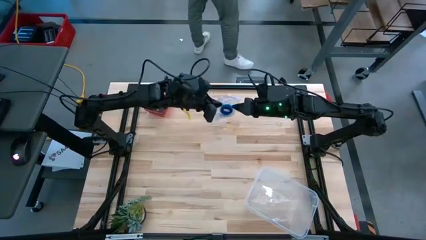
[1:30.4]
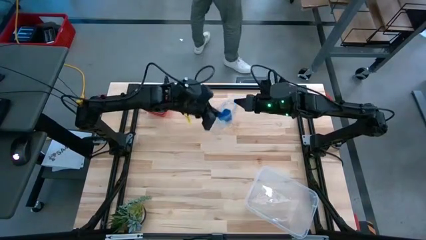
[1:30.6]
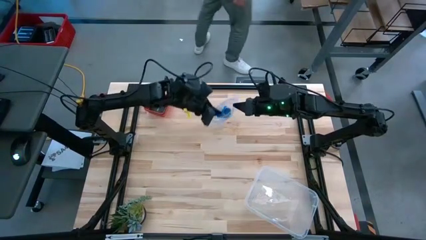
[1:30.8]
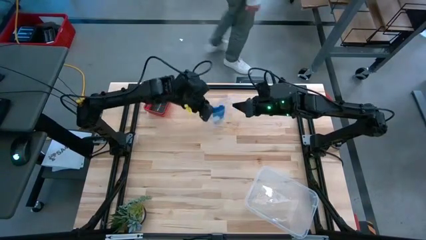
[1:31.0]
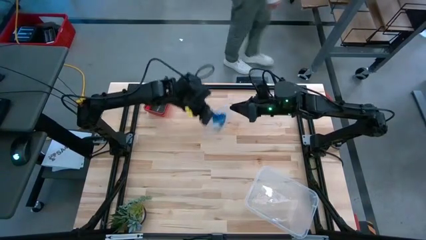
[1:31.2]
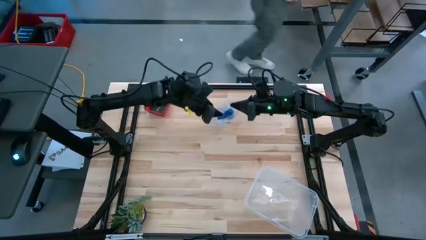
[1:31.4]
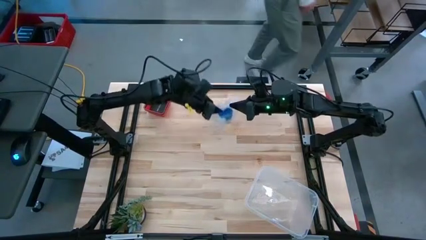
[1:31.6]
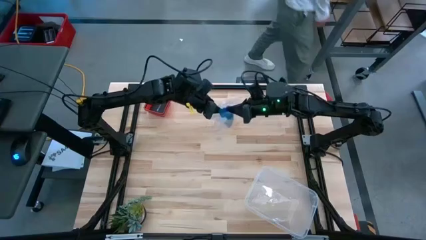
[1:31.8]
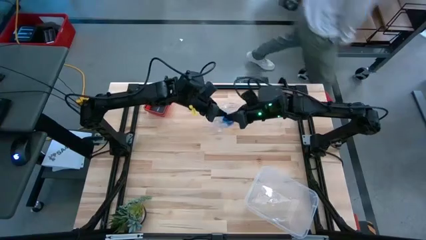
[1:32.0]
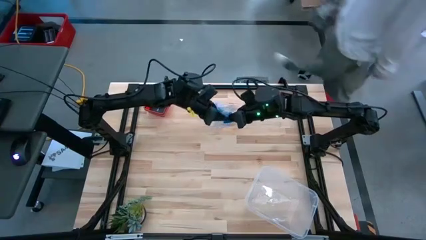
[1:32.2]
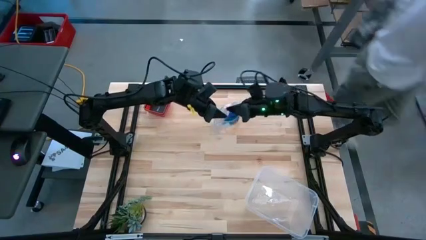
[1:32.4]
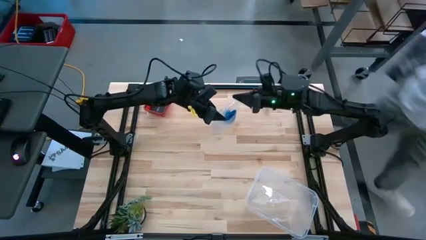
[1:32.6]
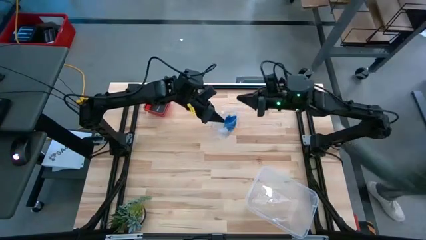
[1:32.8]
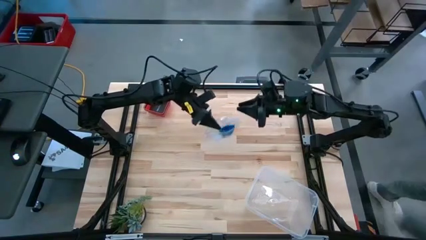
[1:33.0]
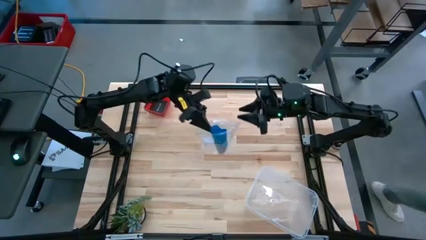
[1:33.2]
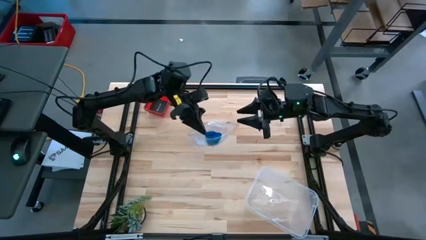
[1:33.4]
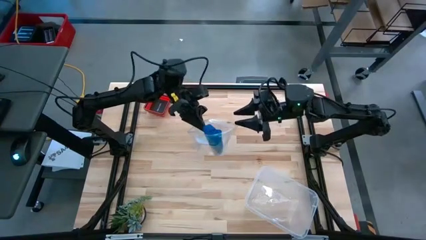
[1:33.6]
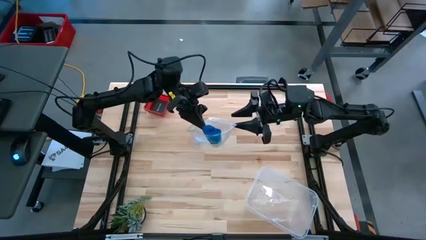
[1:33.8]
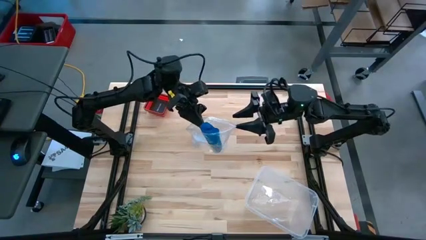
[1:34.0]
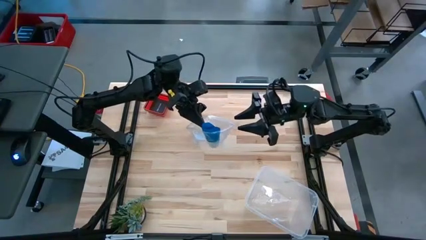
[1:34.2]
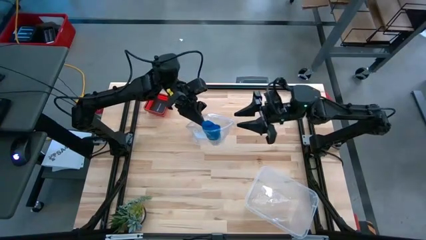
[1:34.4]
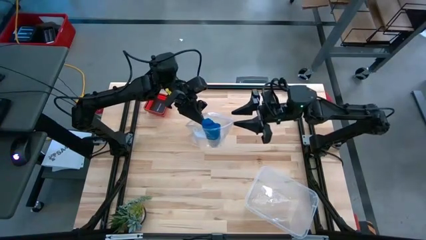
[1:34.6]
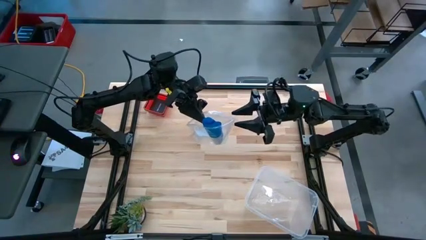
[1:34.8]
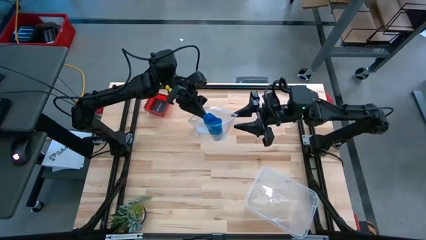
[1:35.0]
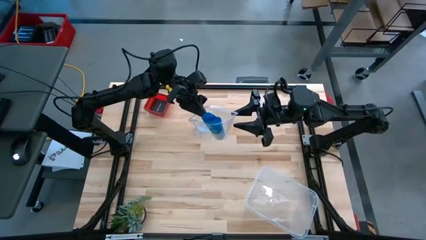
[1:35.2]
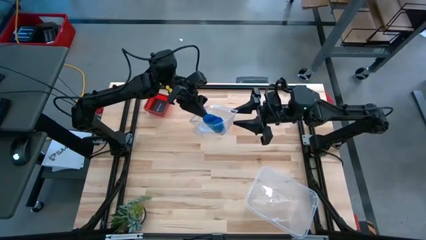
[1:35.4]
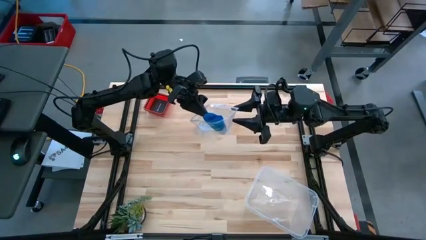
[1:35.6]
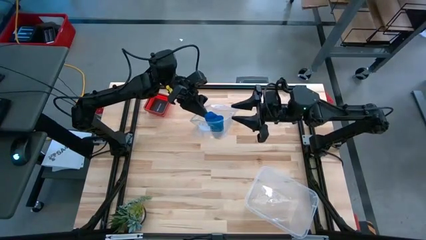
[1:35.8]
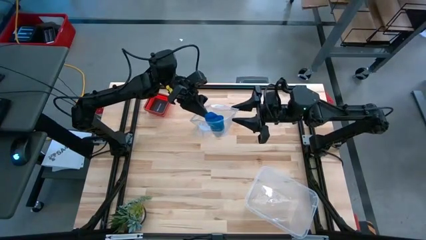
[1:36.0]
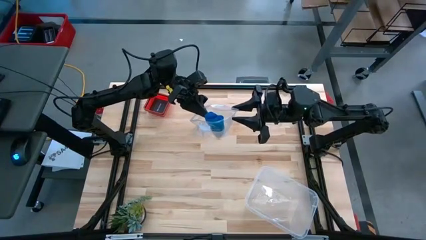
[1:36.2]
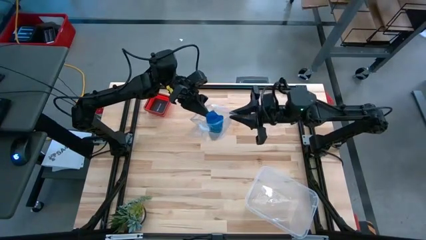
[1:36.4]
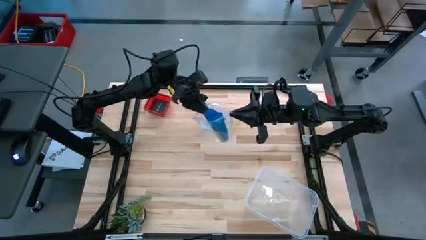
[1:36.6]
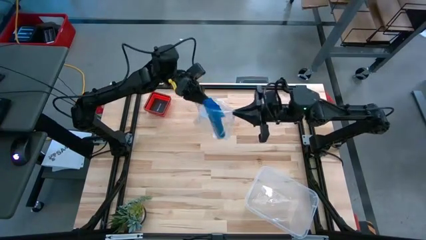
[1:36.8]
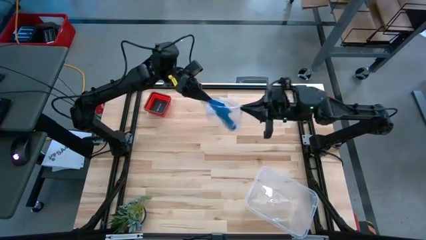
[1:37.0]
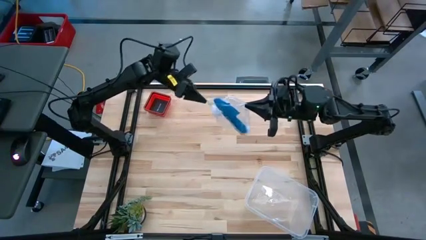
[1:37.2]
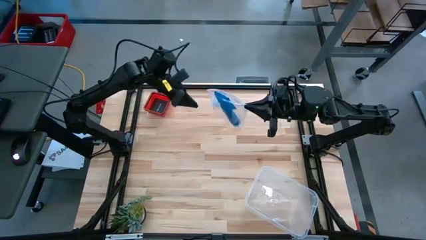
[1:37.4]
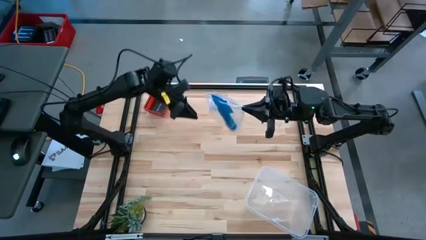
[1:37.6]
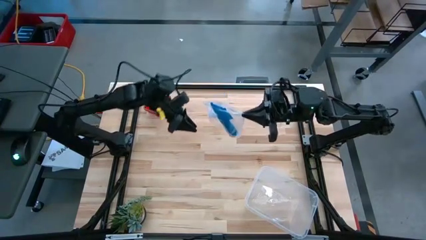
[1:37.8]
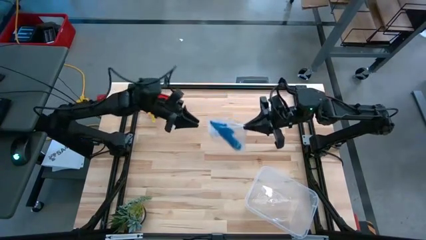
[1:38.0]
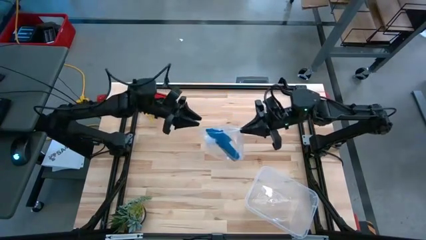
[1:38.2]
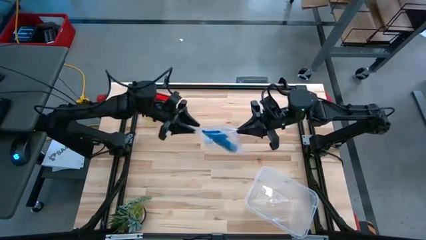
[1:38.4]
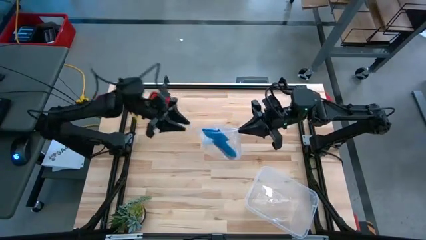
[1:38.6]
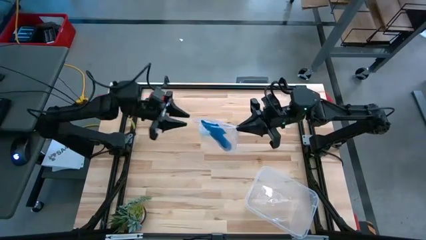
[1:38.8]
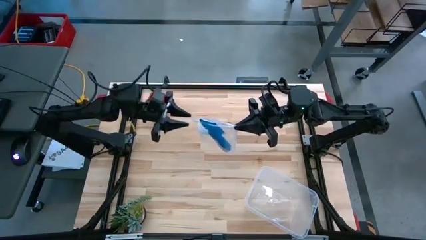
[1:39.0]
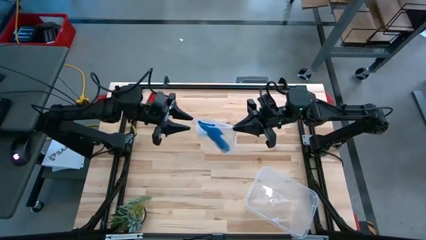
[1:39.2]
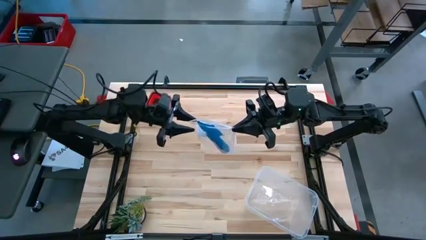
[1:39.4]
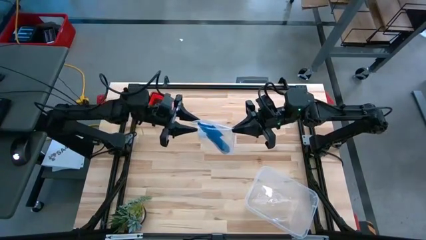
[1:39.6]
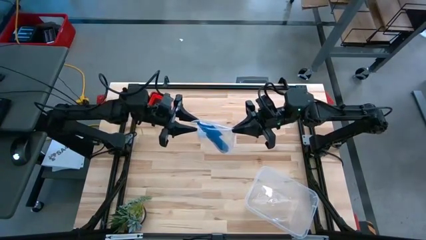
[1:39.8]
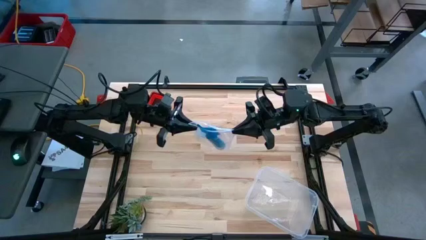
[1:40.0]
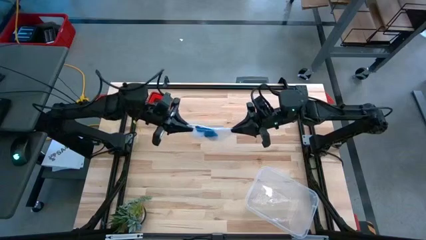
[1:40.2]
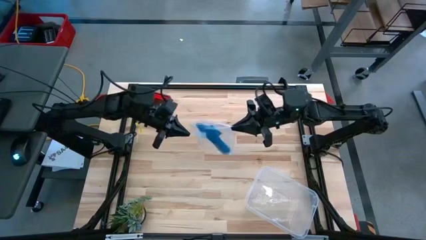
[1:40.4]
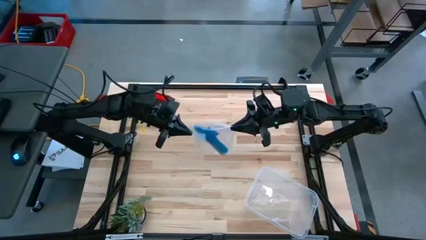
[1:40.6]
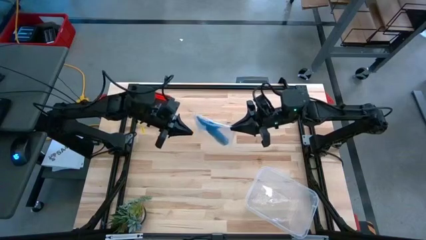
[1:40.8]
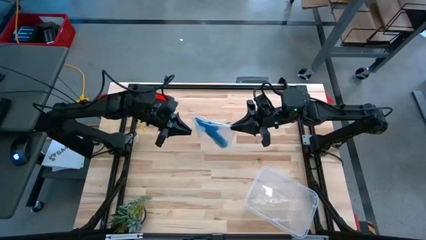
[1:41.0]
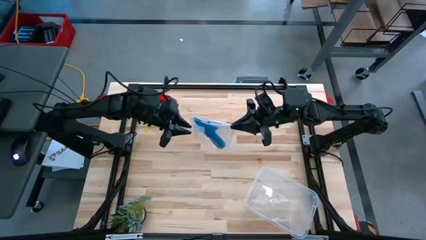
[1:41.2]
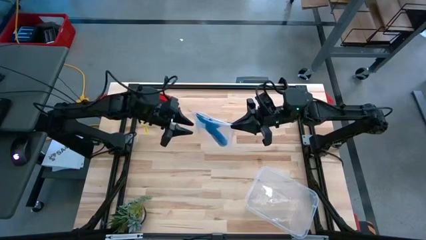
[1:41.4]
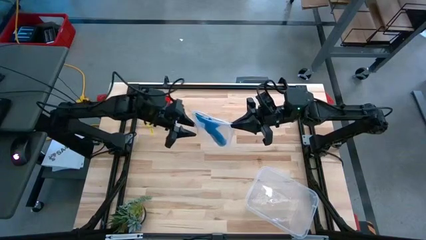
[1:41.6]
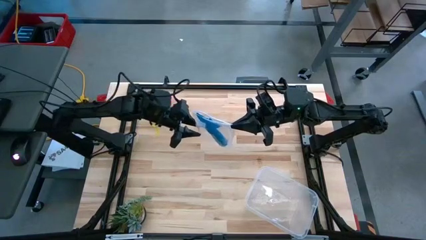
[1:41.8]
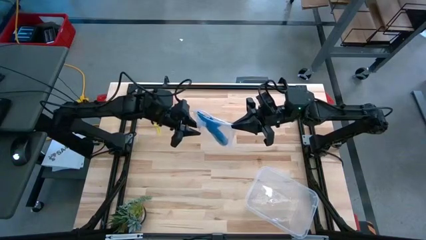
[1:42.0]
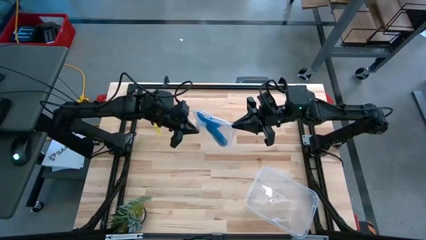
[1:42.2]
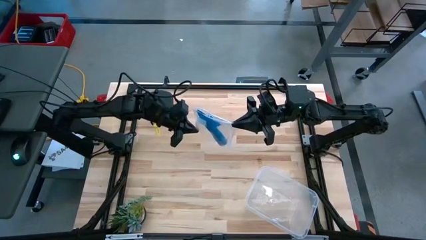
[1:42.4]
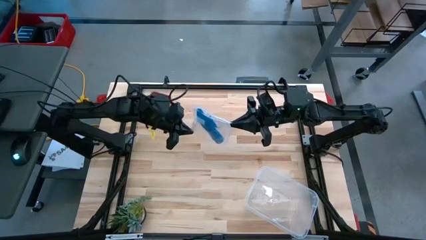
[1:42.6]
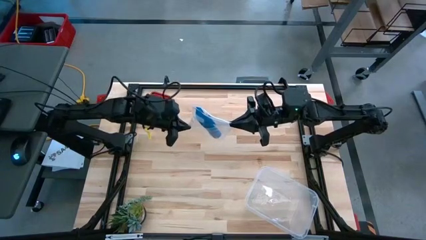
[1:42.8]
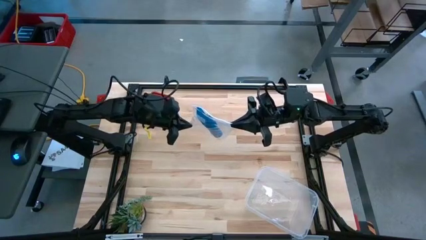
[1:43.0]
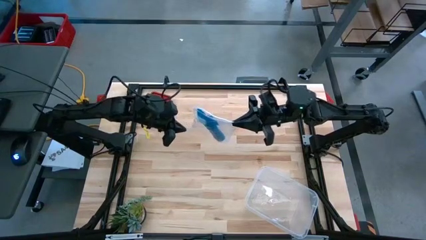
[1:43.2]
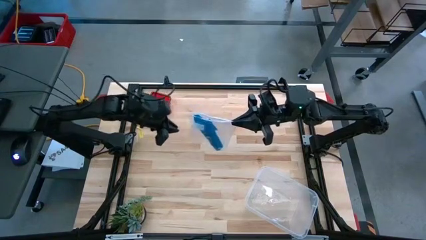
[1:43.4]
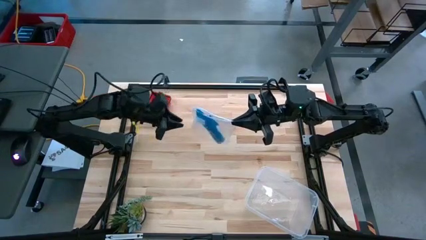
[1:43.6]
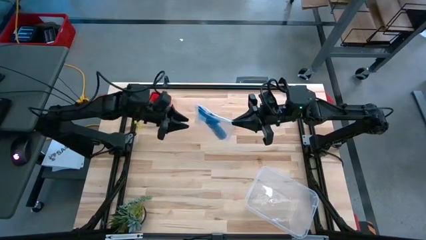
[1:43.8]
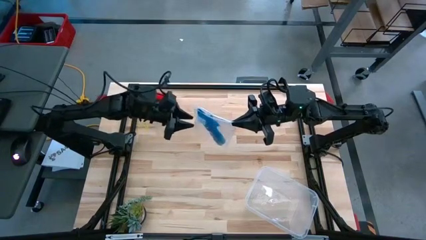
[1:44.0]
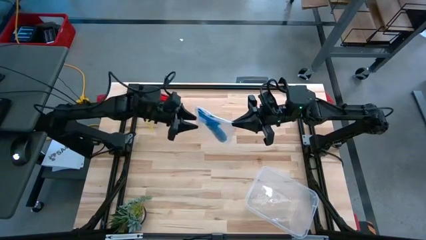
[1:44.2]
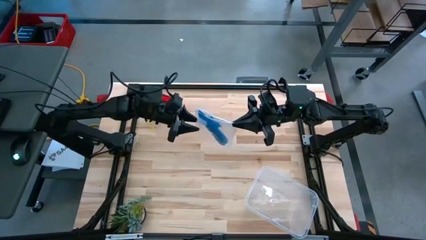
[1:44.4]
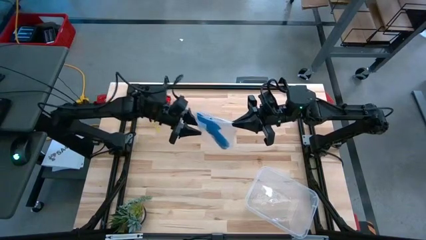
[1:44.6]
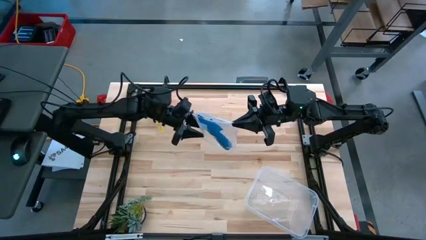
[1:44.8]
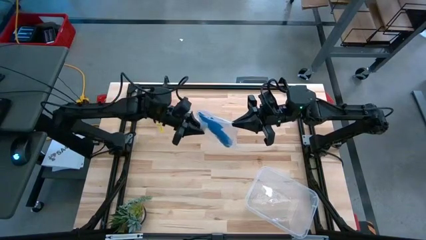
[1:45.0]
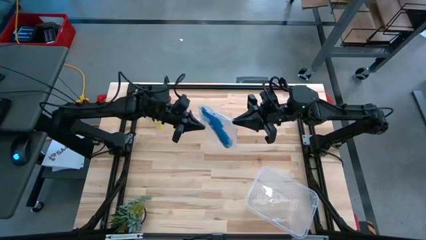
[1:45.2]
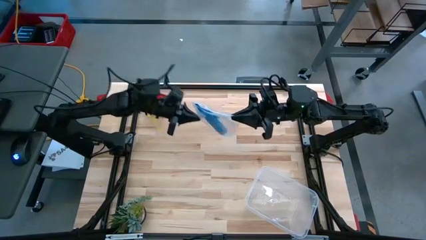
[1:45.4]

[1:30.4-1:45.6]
Task: Roll bandage
Put the blue rolled bandage into the transparent zip bag

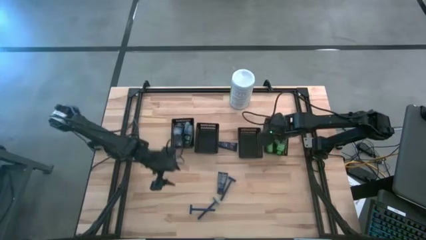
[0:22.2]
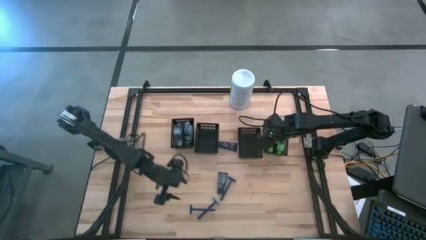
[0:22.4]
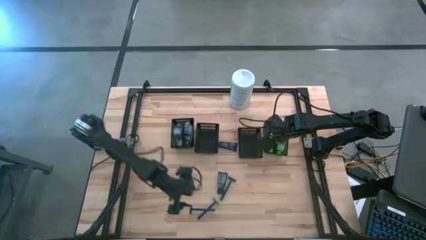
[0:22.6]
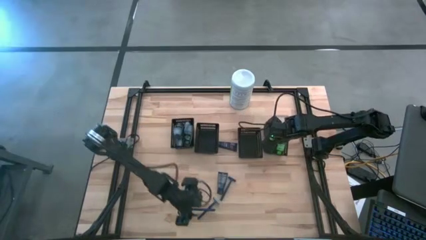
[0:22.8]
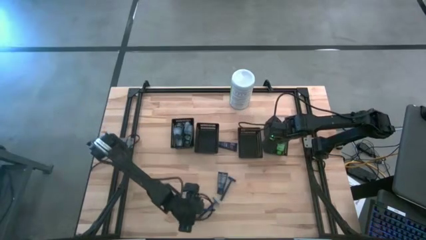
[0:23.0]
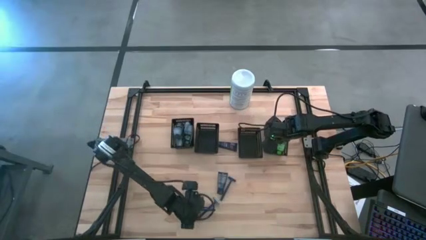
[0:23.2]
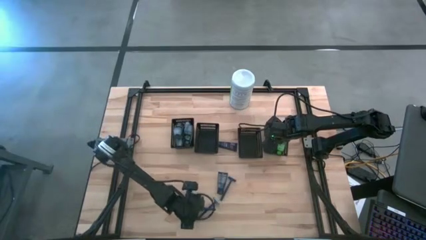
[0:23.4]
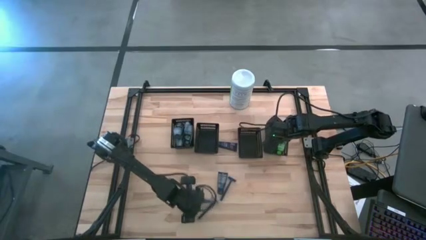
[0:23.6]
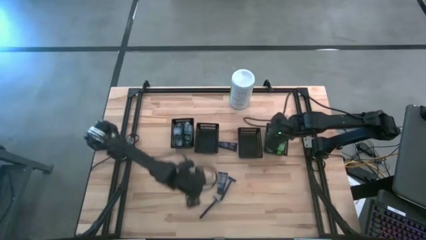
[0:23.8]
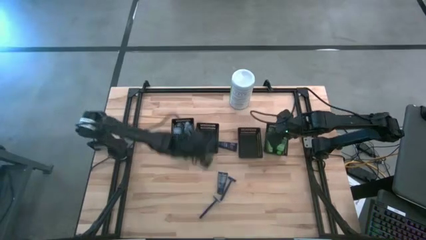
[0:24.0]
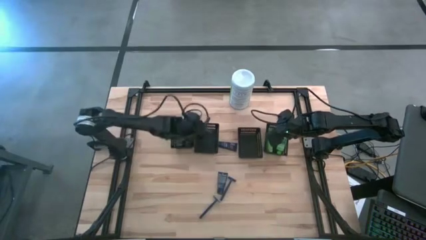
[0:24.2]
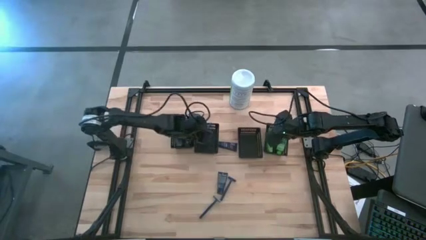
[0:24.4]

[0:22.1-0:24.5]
Task: Pick & Place Travel size toiletries
Put the blue razor into the middle left black bin
